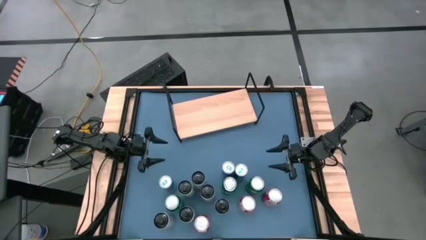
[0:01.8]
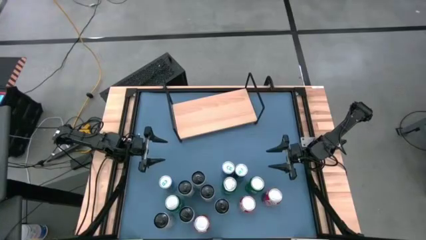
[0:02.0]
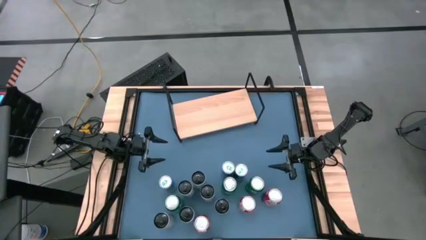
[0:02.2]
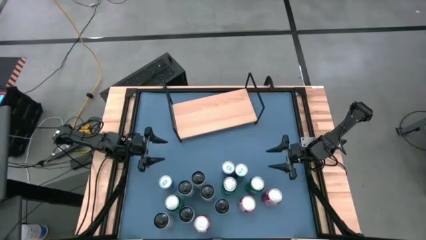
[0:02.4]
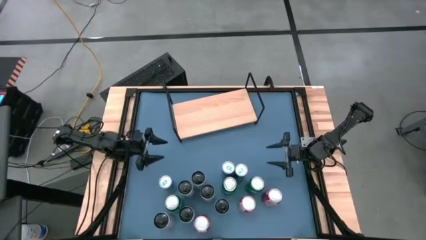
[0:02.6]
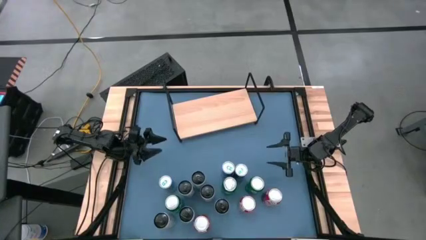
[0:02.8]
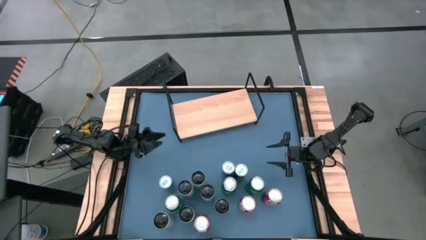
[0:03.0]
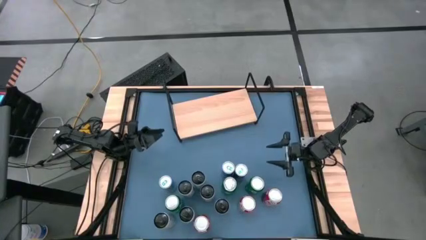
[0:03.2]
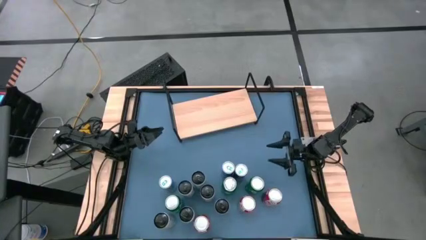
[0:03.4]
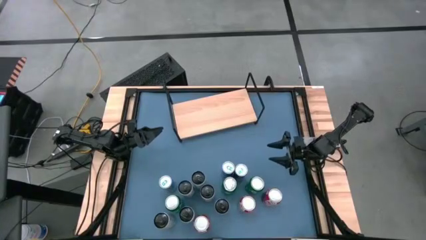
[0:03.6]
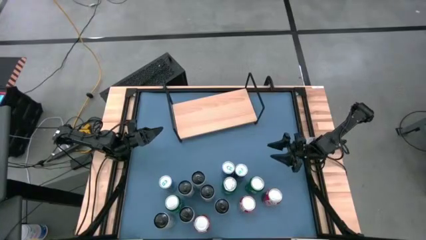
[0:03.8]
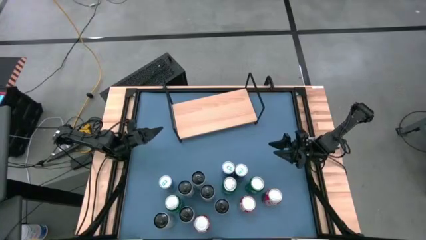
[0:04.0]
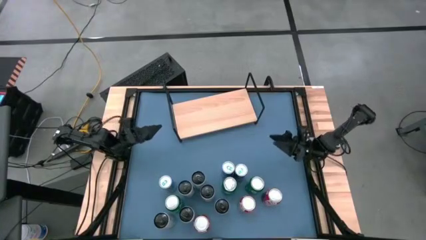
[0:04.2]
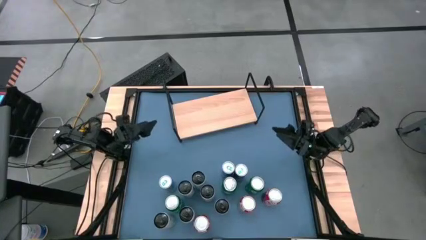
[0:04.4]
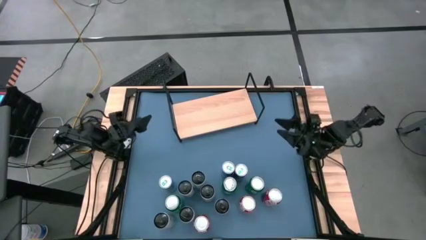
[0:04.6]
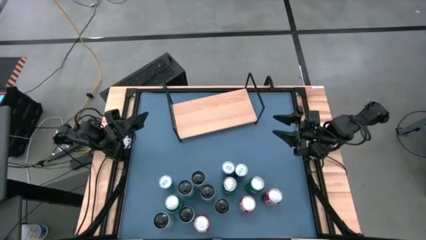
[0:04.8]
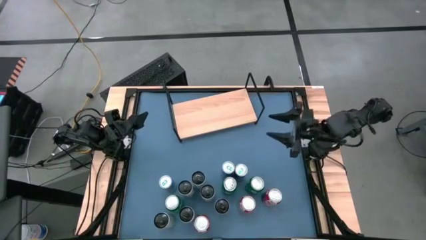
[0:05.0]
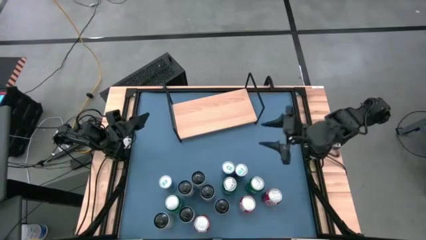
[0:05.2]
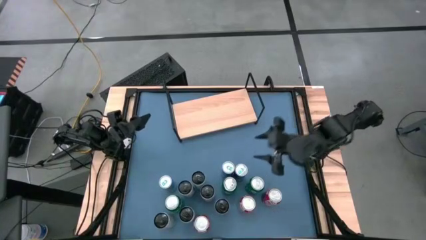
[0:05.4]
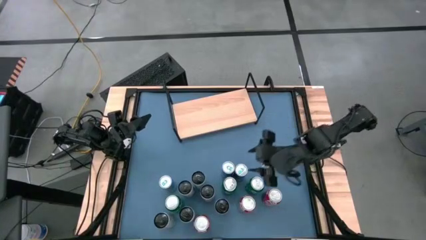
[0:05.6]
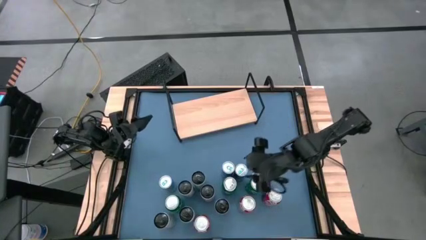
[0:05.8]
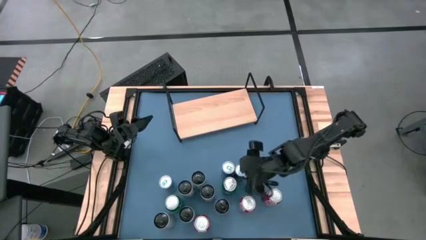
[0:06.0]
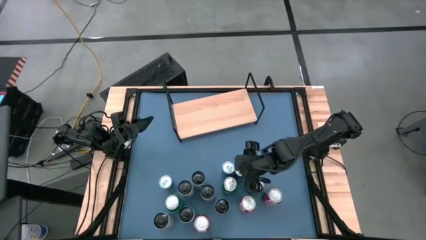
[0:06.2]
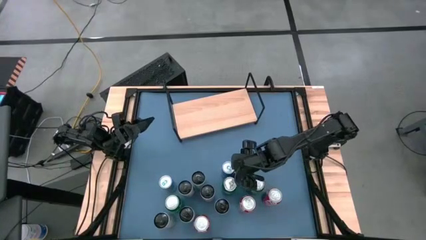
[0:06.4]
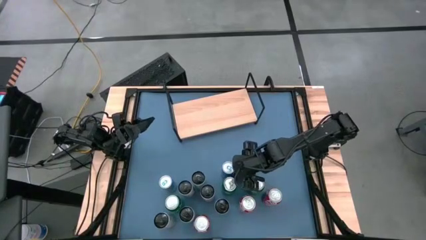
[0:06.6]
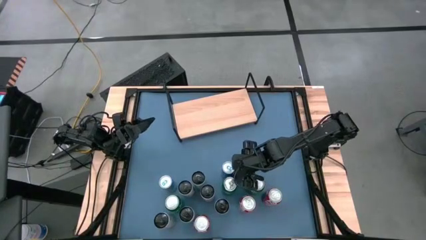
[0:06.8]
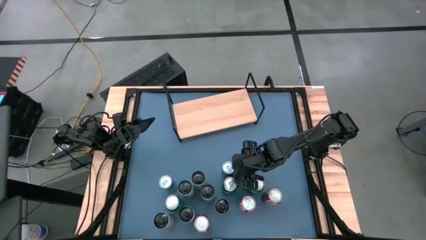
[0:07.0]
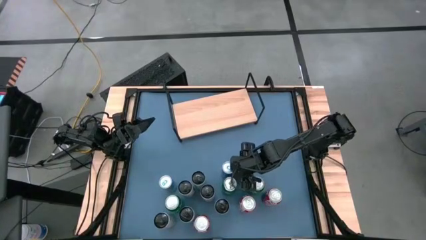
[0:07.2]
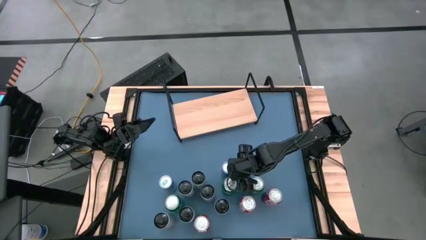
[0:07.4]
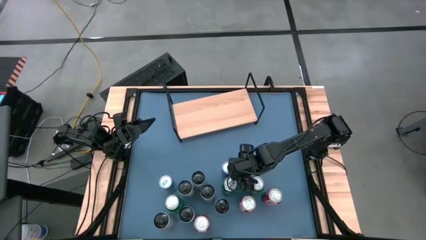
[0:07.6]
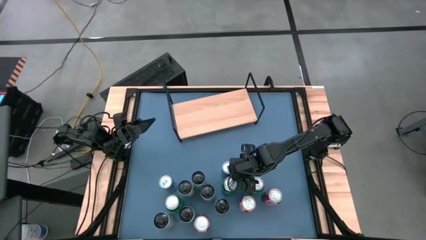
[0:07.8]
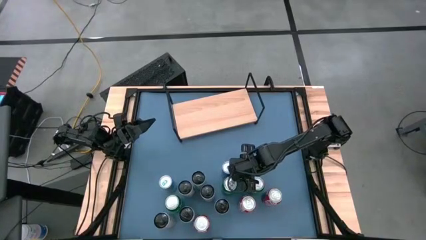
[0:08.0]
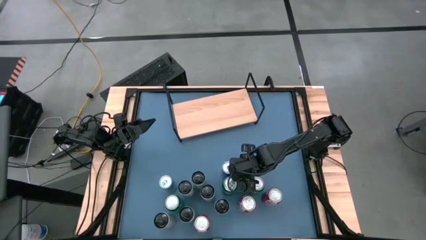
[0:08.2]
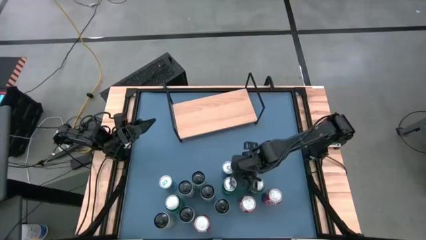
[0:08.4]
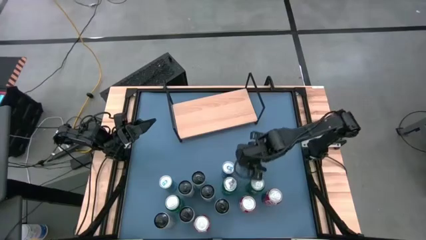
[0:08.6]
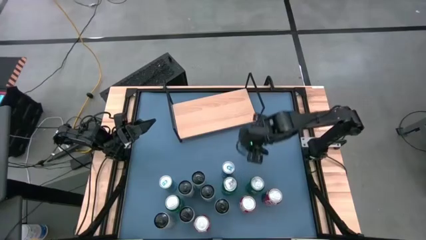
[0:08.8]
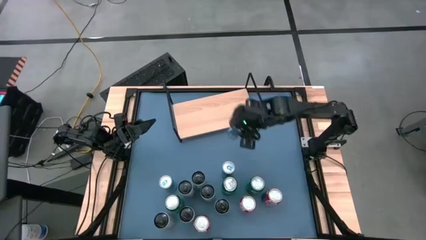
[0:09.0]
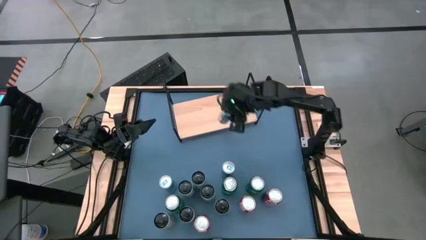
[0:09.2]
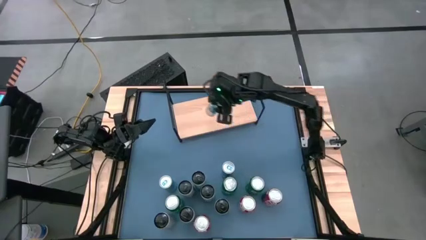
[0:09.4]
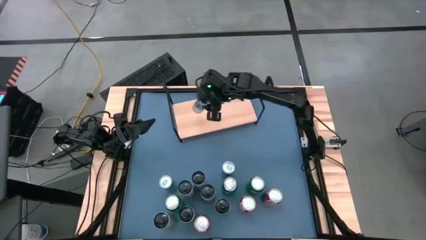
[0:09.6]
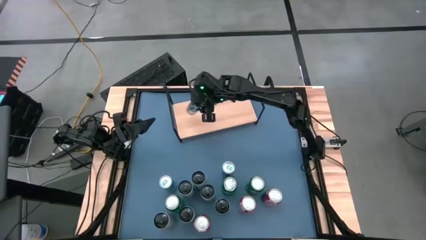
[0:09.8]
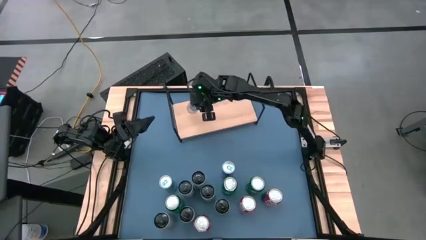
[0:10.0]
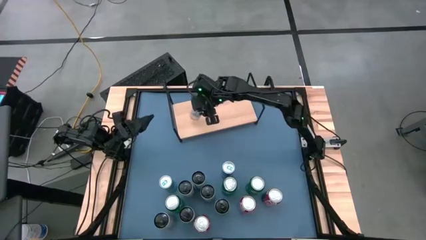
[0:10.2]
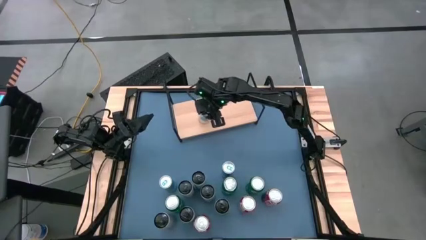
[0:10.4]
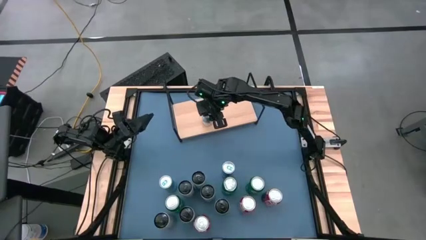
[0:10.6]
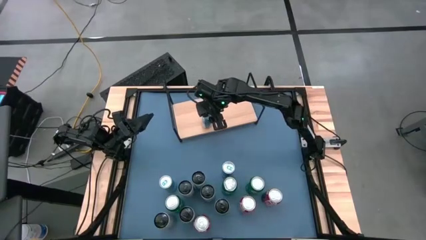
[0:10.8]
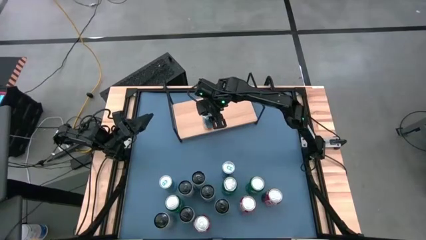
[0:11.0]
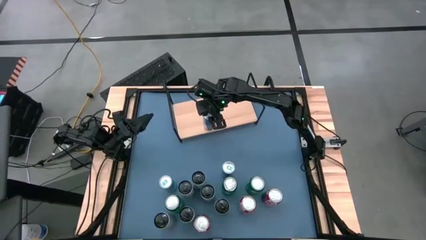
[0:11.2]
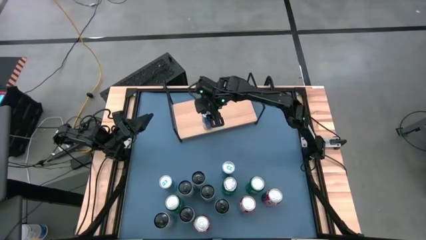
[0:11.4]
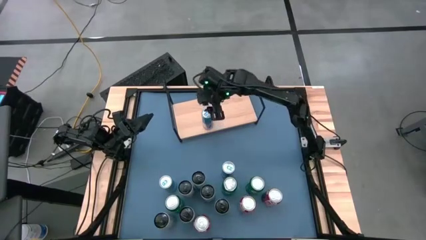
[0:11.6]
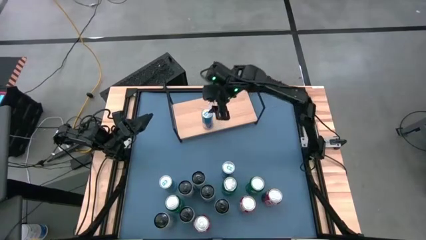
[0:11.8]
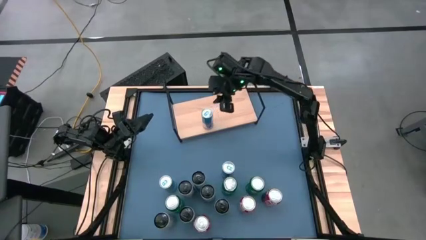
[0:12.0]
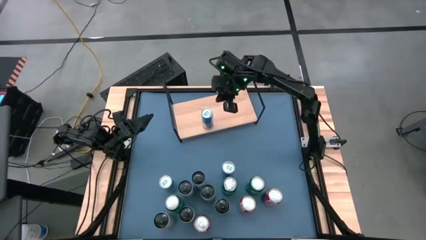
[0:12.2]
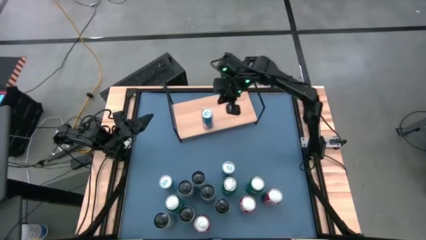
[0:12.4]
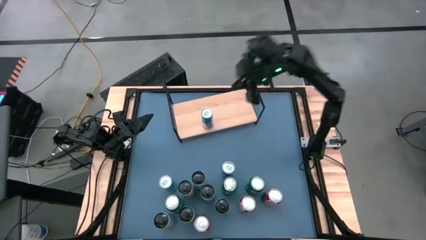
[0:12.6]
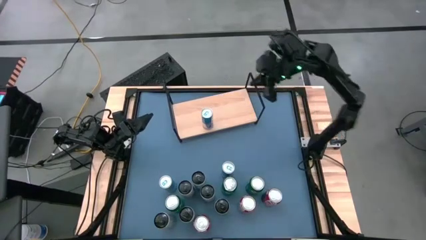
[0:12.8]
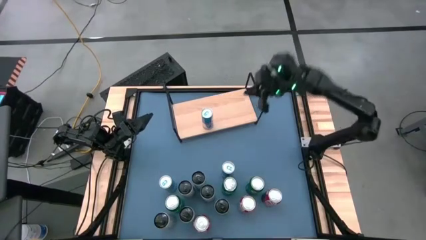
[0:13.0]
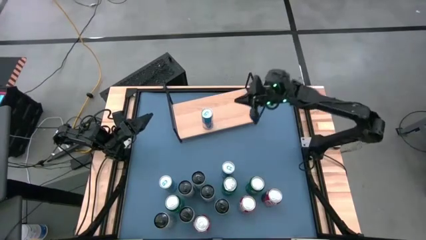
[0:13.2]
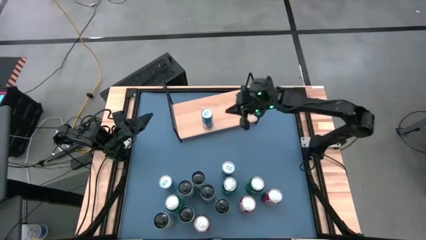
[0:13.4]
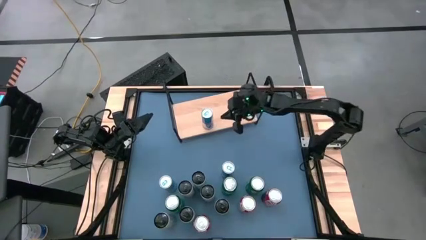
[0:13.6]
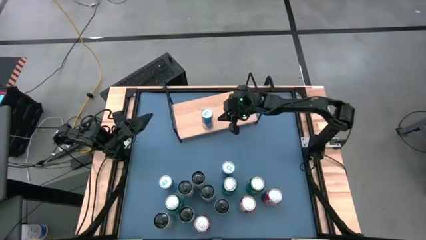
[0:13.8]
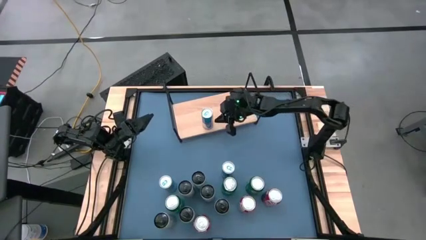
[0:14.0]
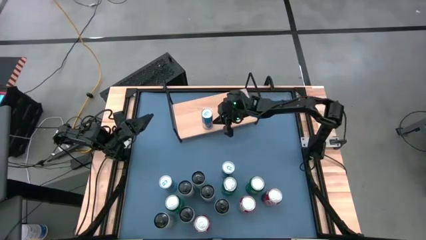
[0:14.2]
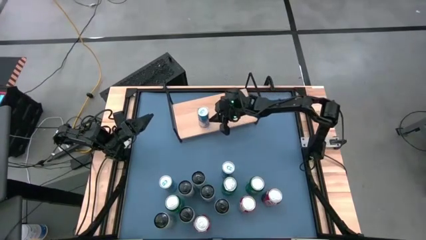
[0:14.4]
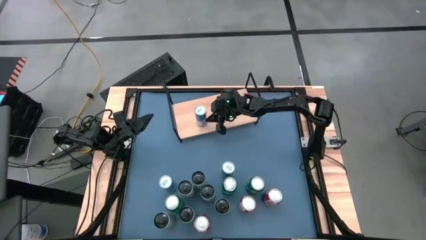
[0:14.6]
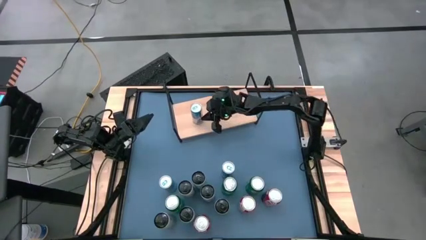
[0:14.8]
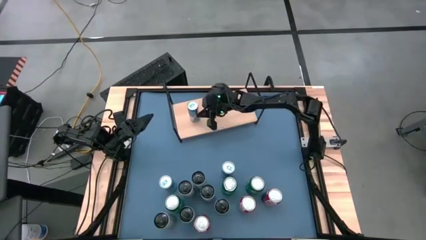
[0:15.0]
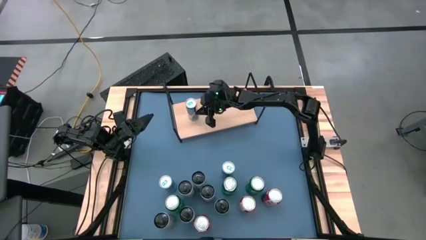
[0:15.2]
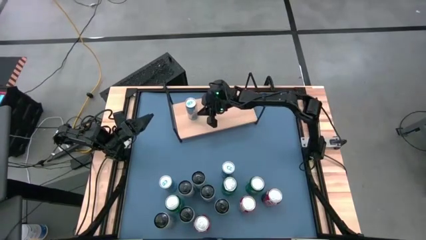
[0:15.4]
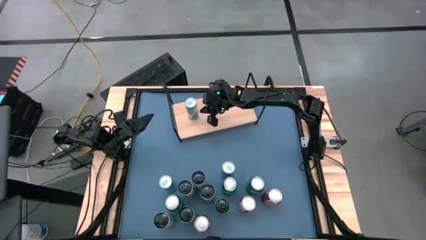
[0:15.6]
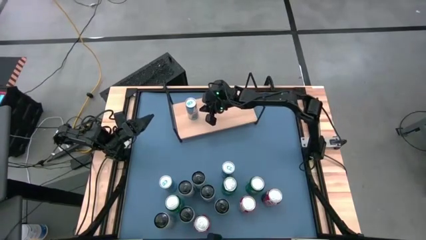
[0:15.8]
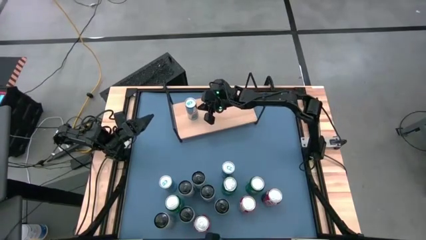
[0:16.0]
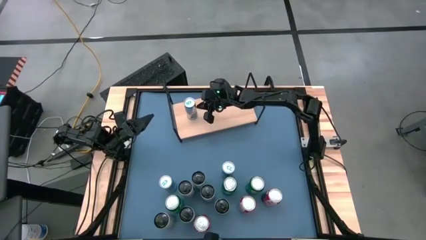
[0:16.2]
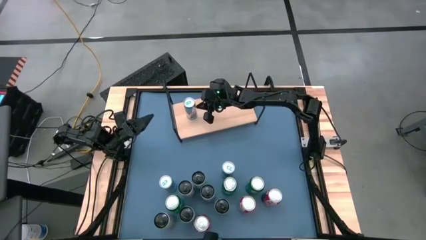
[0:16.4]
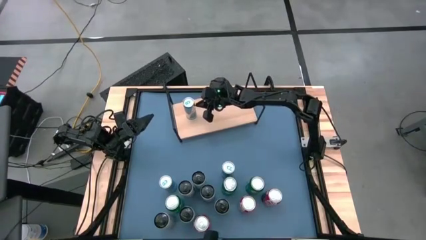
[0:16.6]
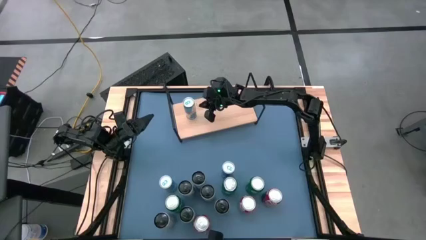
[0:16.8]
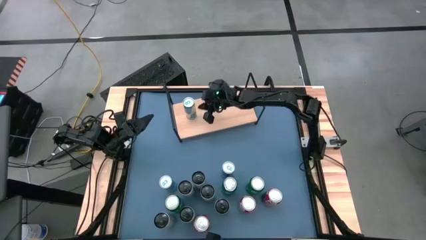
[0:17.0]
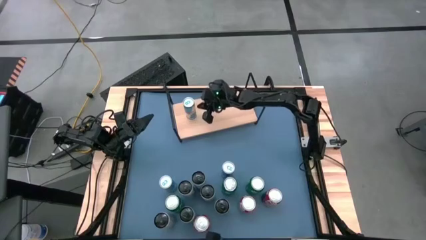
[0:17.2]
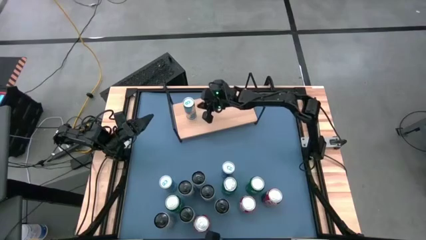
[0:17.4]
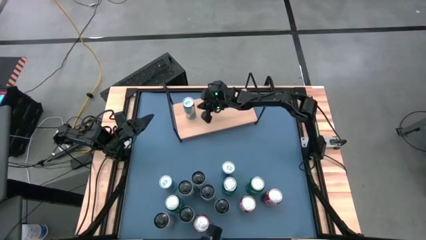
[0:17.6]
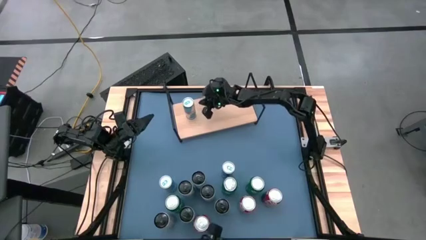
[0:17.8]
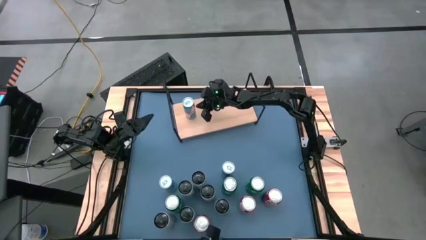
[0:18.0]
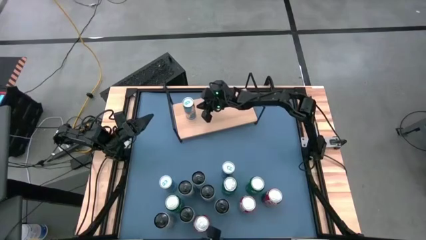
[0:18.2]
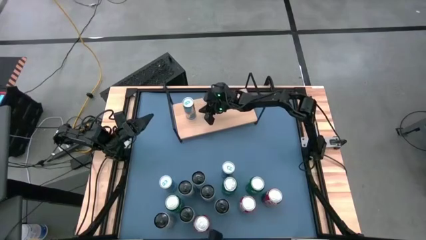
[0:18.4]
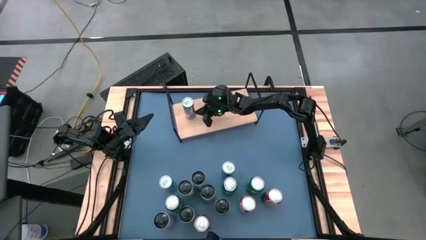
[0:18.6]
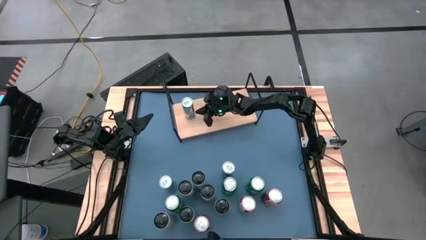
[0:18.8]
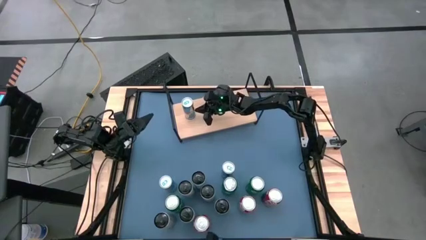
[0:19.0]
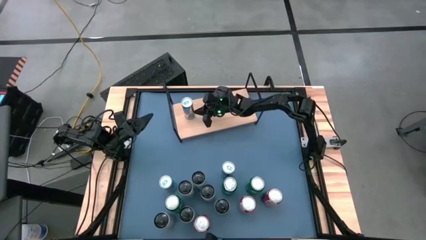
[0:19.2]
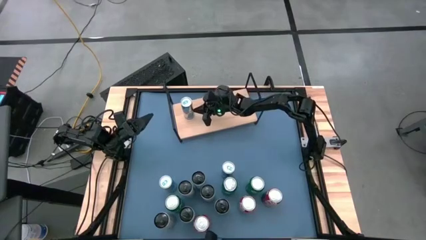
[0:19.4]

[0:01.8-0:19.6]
Task: Place canned beverage on shelf
Put the right blue soda can on the shelf
